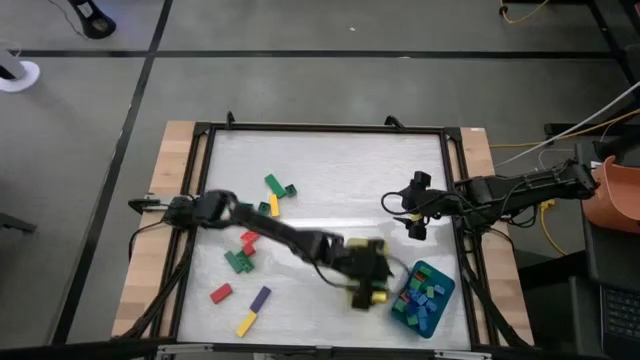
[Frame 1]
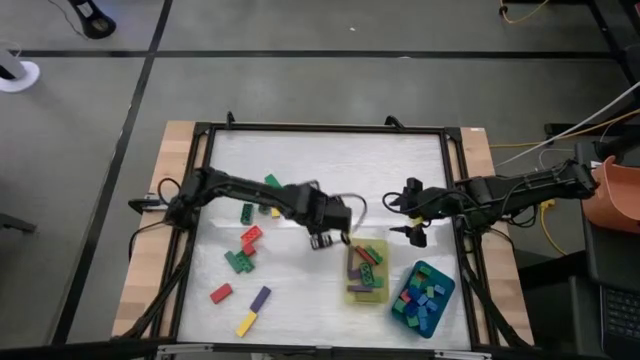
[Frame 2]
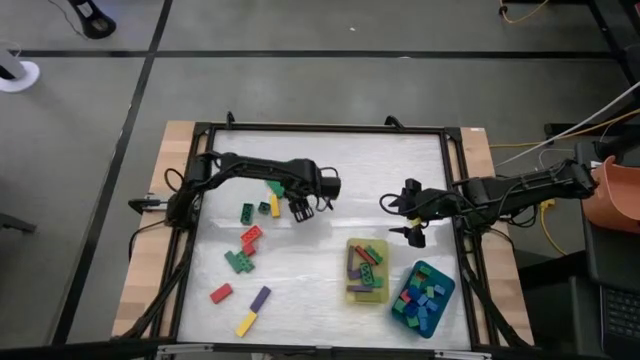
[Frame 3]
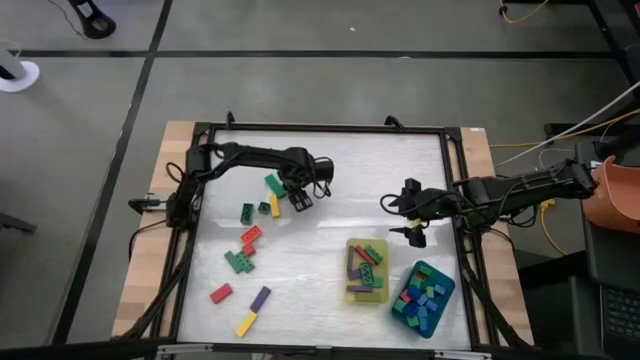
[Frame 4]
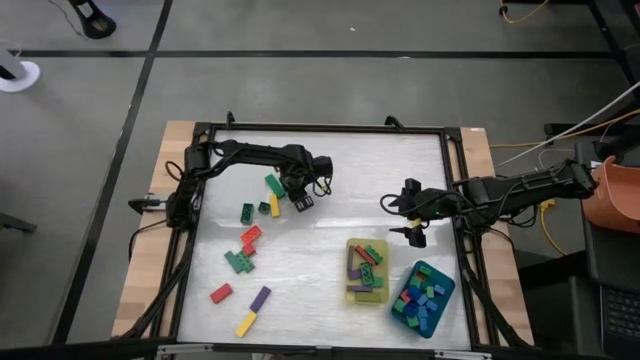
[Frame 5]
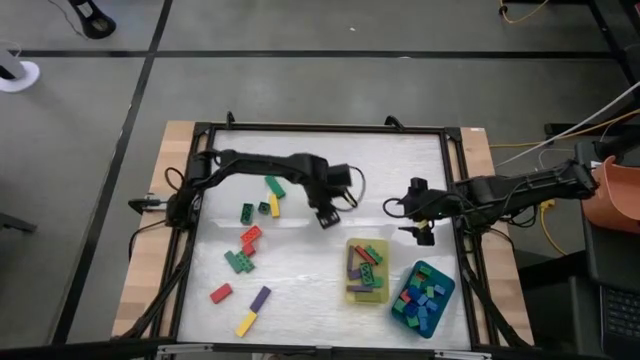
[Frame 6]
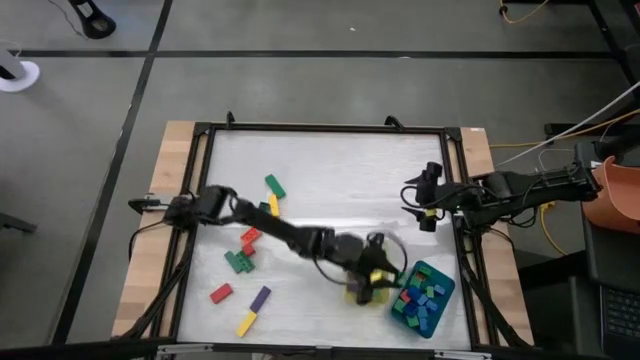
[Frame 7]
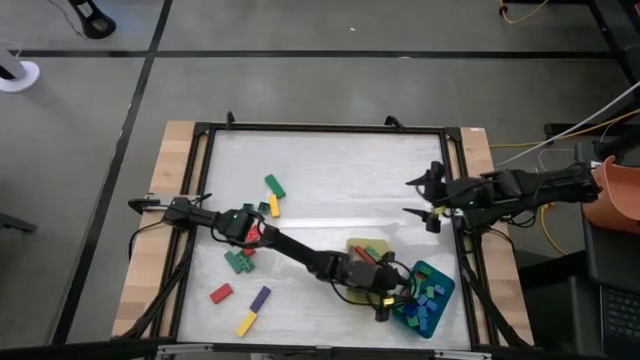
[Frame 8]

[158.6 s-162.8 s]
Task: Sort blocks by size
Put the small green game piece into the blue bin

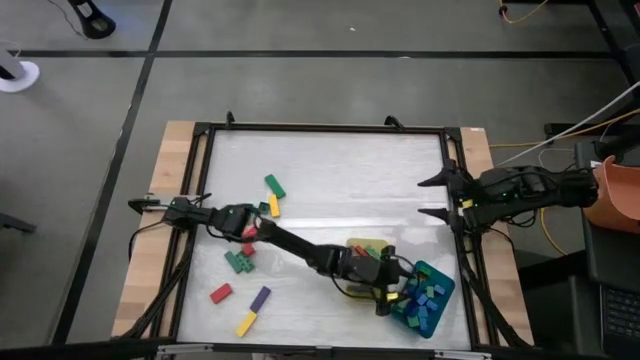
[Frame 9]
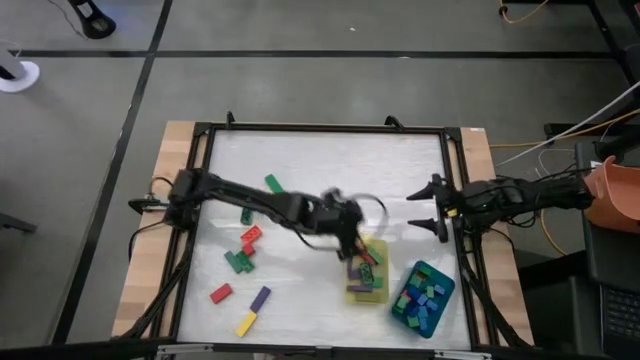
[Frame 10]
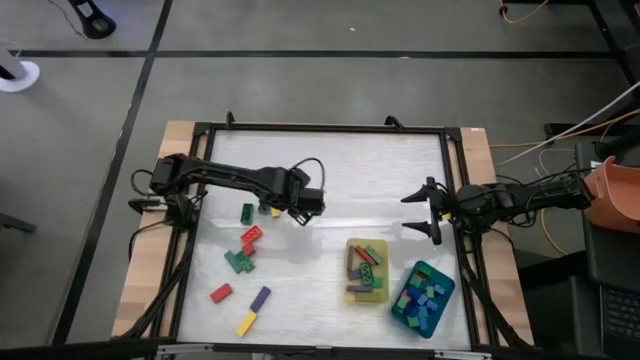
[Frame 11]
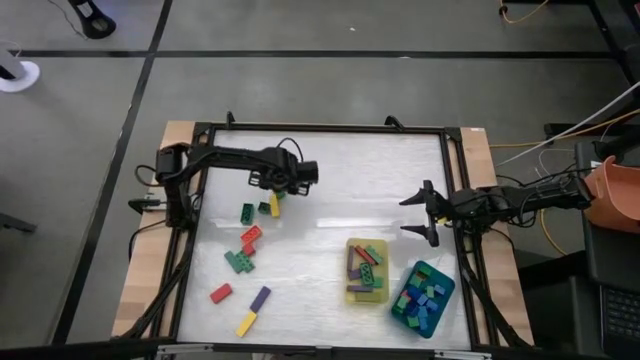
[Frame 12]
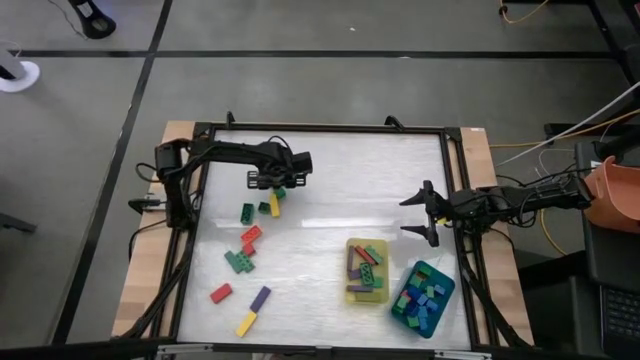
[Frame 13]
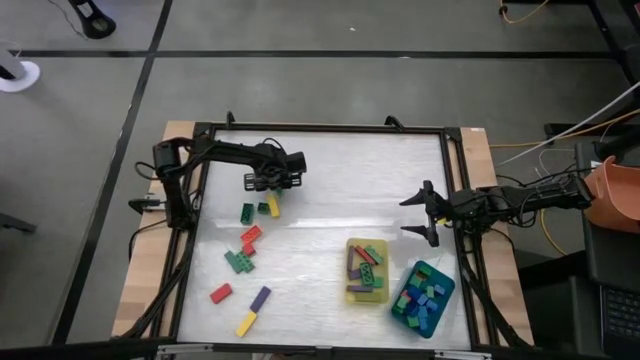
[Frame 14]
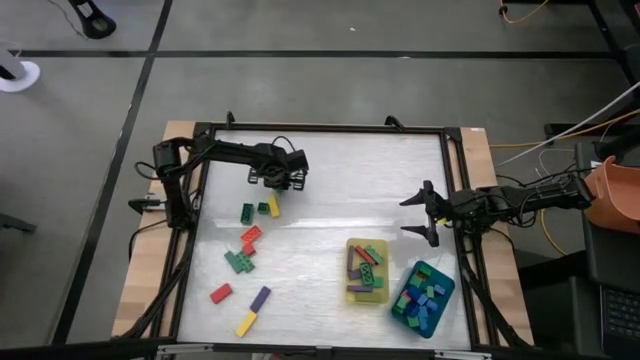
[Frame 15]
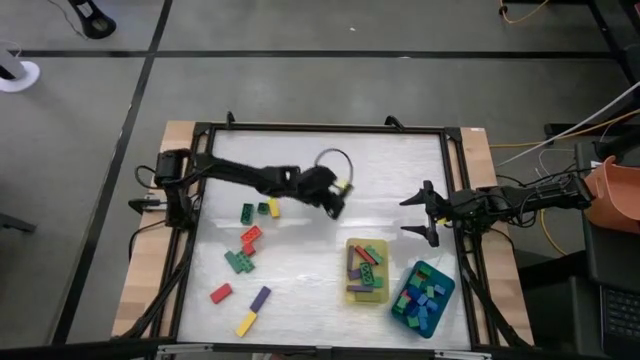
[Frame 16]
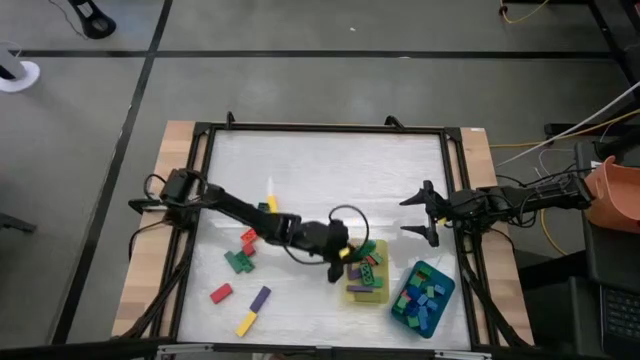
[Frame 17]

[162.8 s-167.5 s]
Put the long green block into the yellow bin

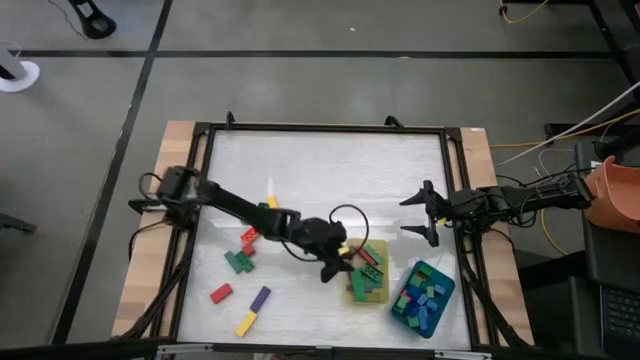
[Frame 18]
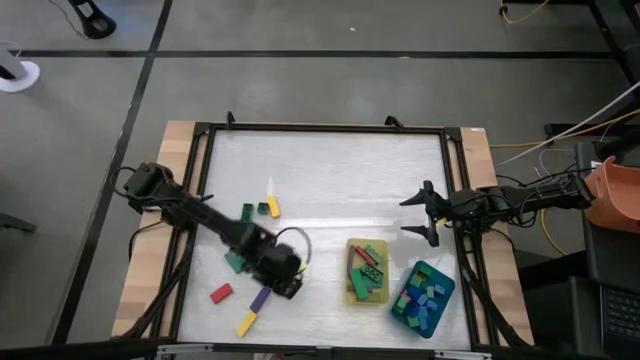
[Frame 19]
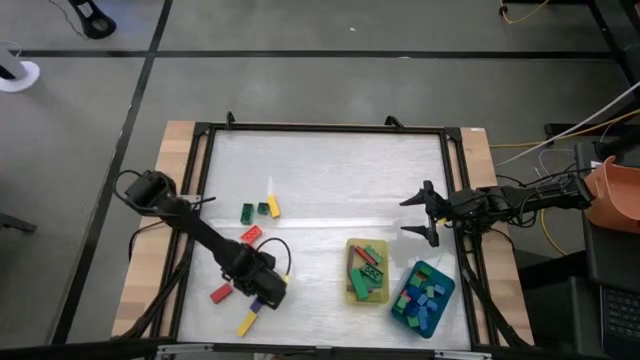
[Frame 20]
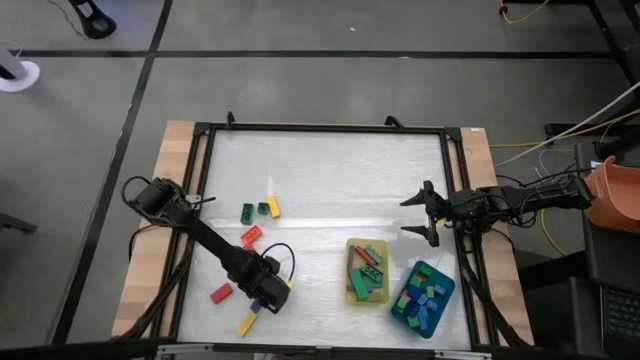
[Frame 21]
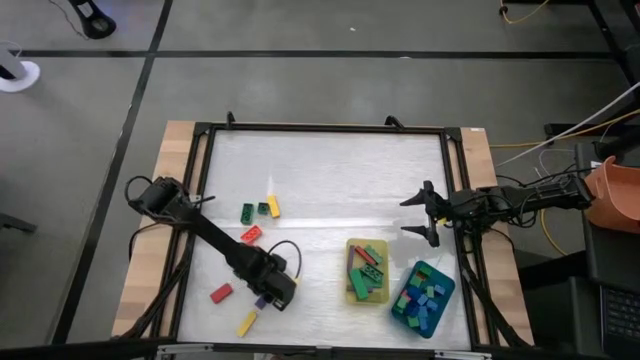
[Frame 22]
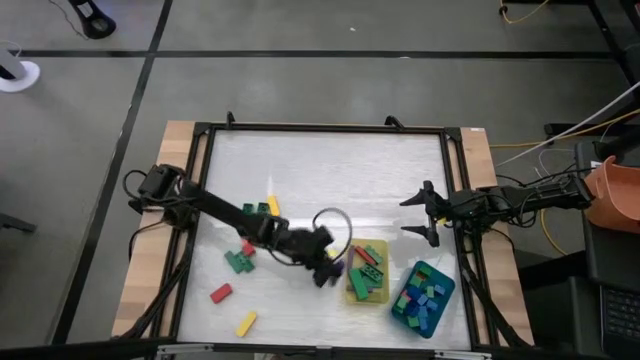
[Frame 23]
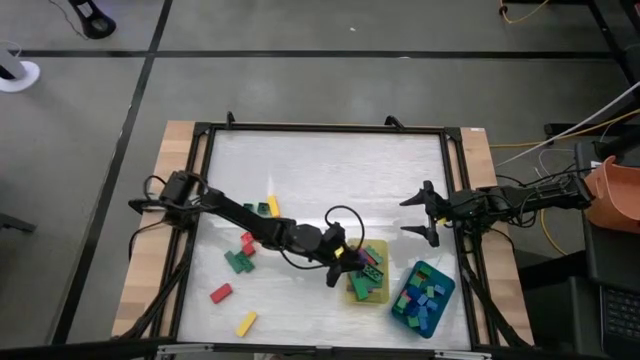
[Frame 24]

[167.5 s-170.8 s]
Put the long violet block into the yellow bin

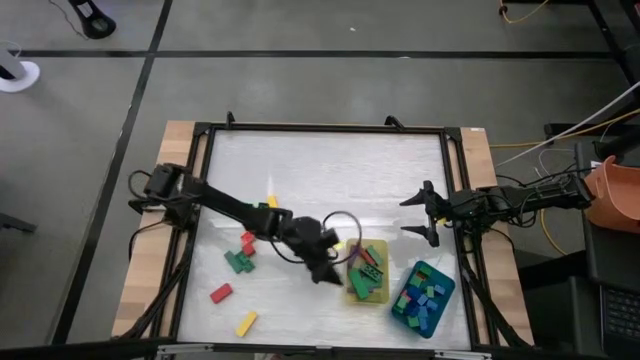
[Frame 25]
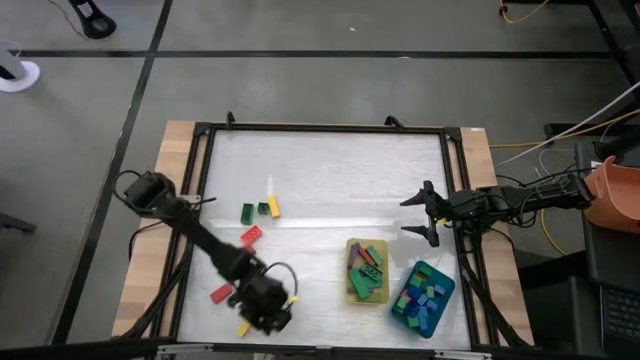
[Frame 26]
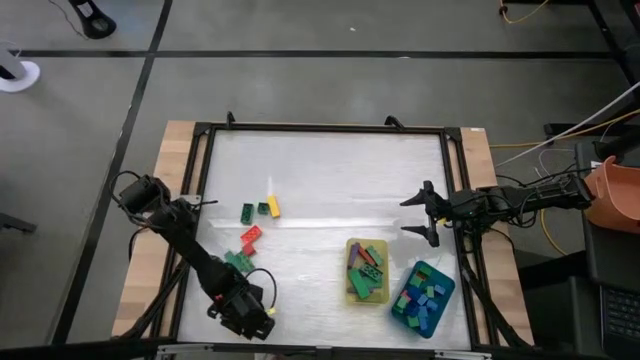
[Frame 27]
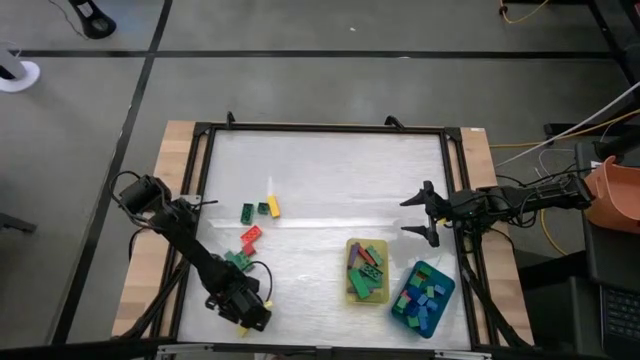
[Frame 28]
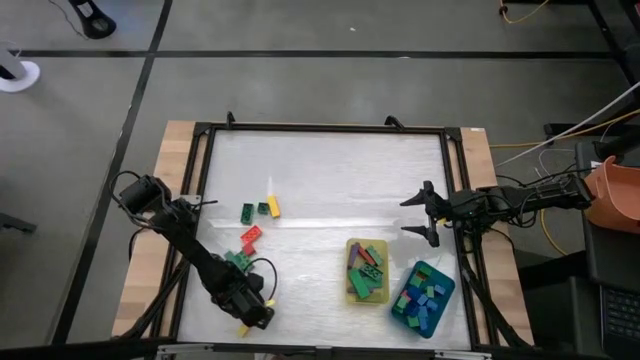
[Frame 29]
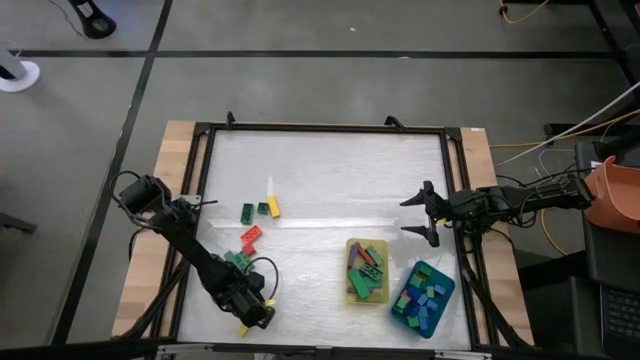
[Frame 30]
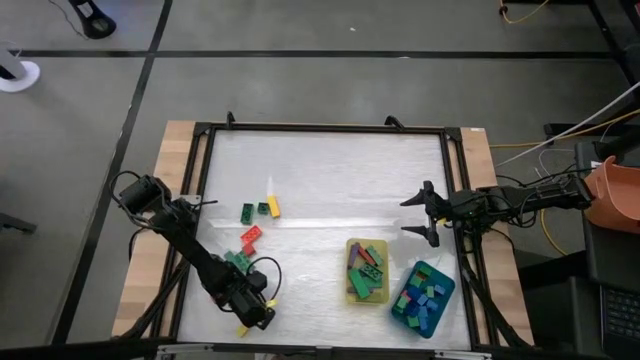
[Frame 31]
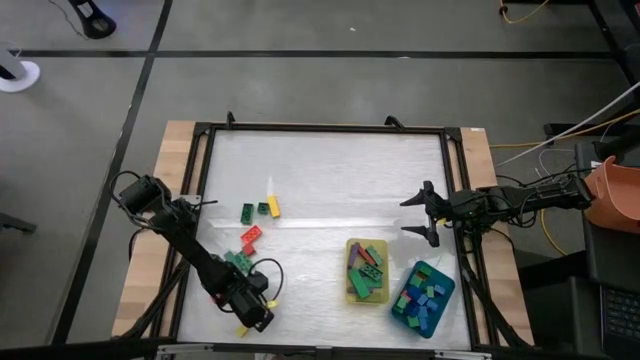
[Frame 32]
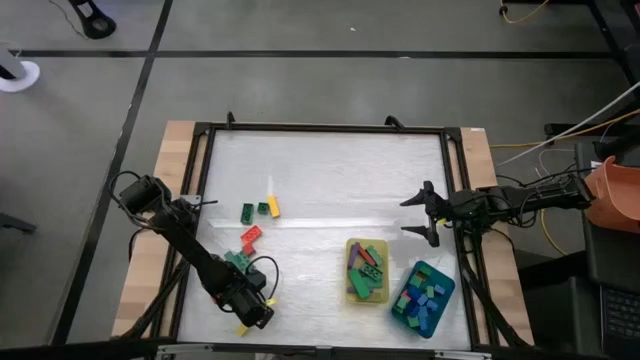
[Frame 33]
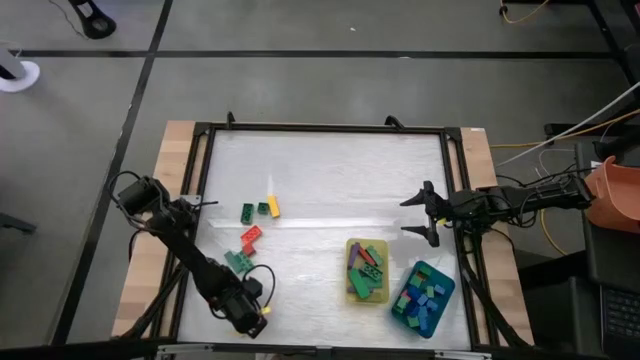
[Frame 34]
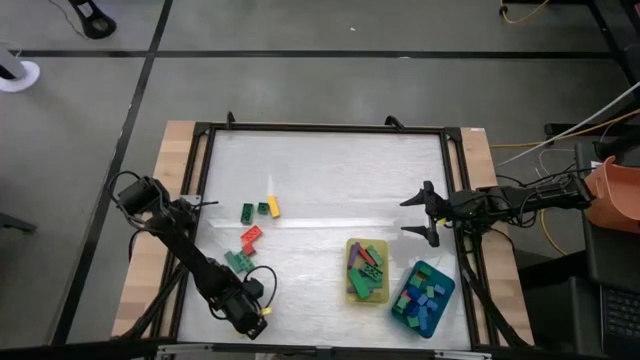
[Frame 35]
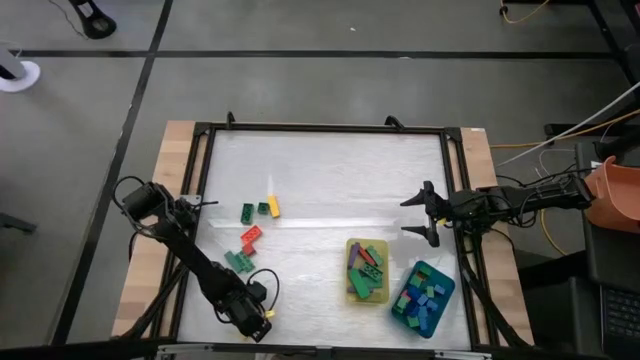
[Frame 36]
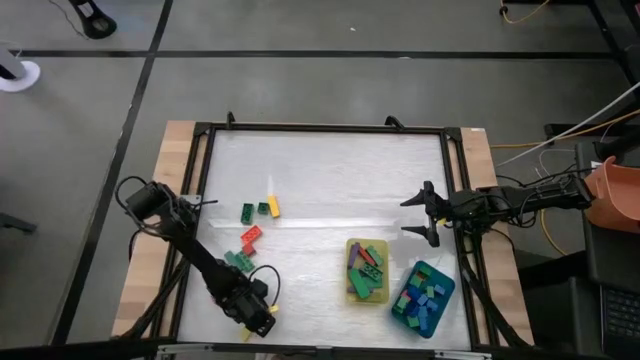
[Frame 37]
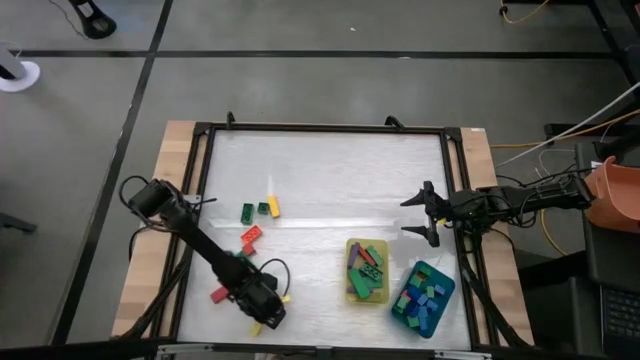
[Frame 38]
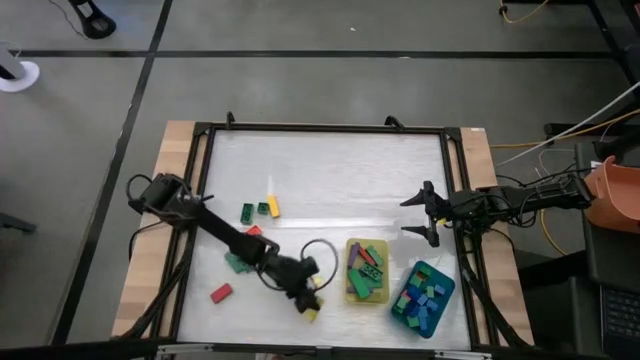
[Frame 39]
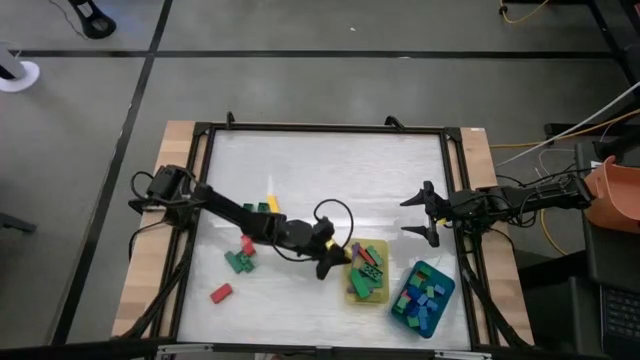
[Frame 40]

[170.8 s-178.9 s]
Put the long yellow block into the yellow bin

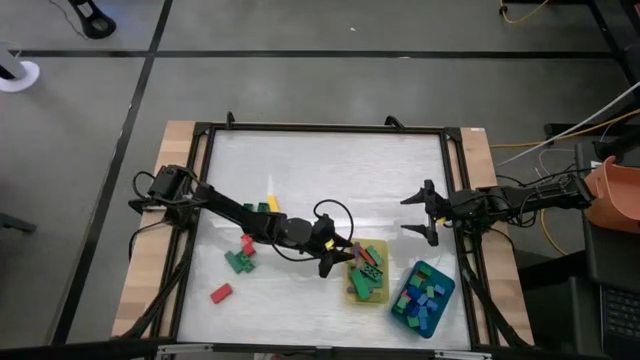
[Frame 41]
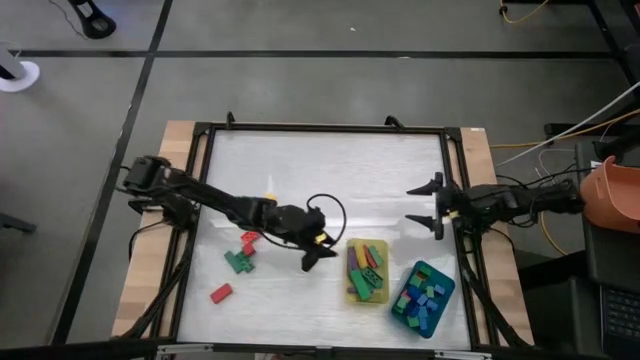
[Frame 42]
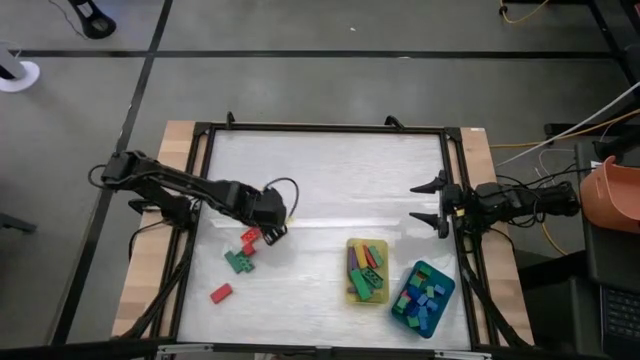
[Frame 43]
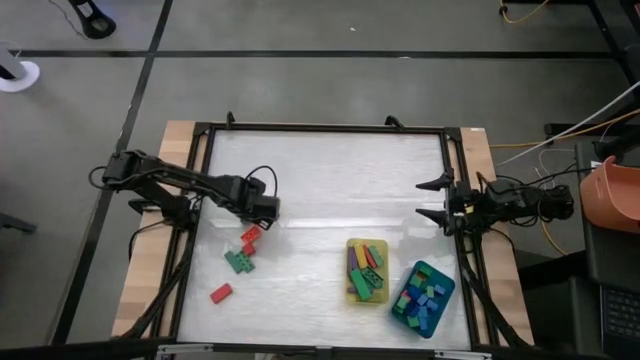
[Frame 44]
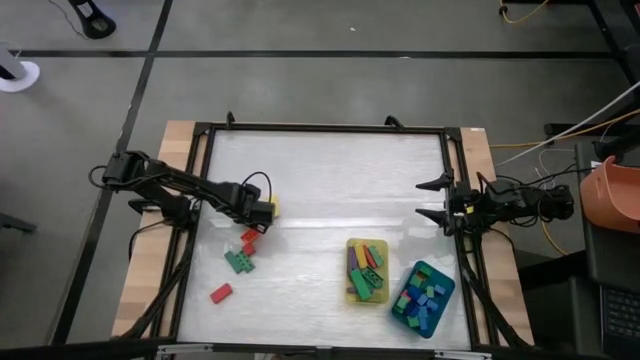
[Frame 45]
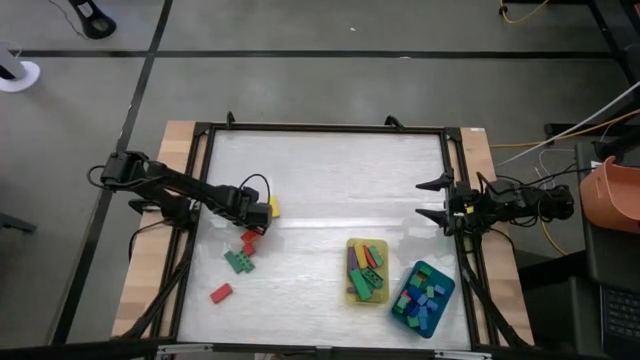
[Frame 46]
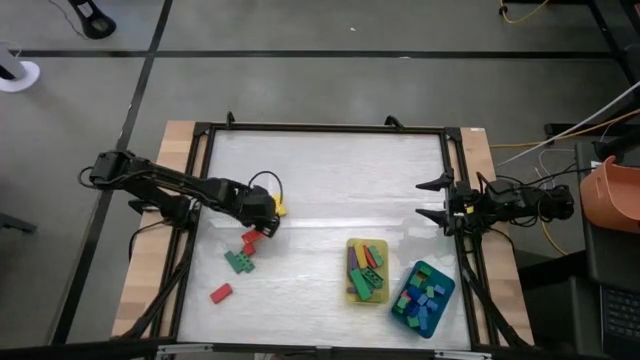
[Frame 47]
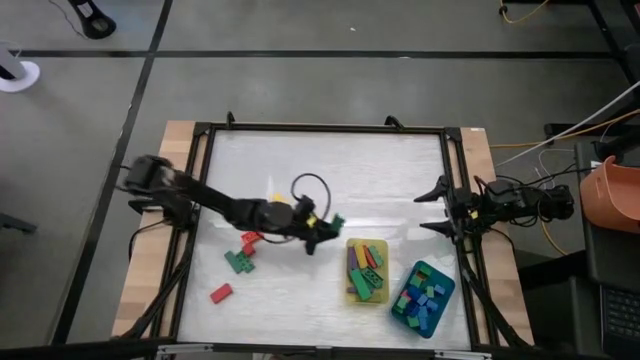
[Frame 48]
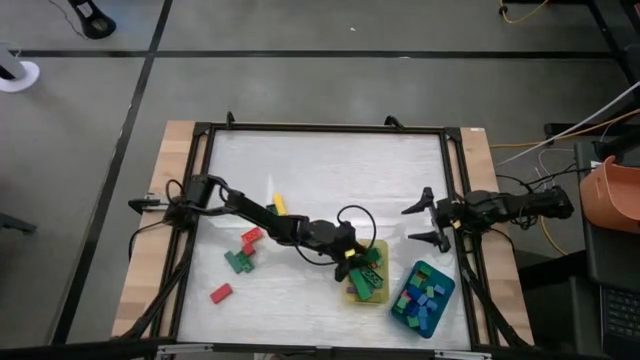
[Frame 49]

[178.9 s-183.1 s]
Put the long green game piece into the yellow bin
